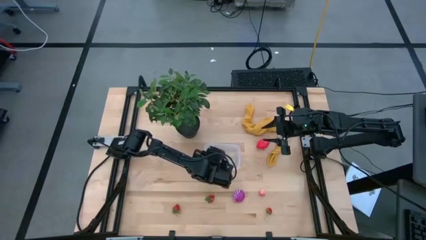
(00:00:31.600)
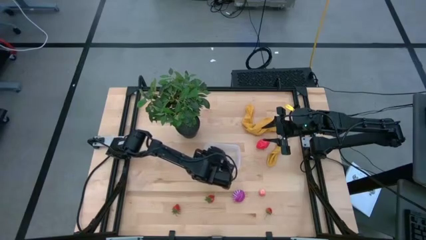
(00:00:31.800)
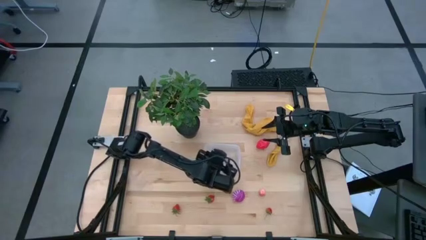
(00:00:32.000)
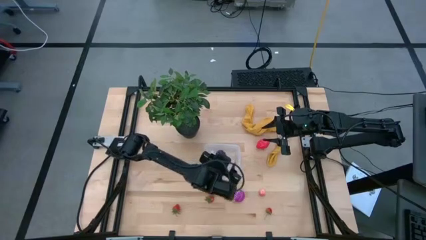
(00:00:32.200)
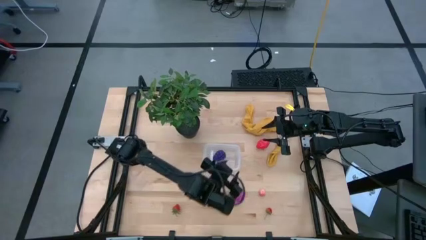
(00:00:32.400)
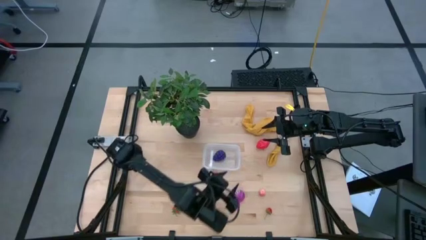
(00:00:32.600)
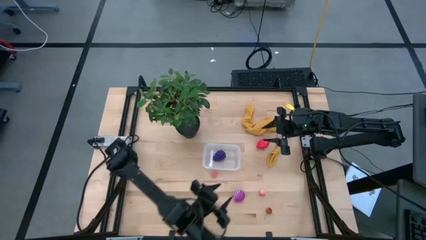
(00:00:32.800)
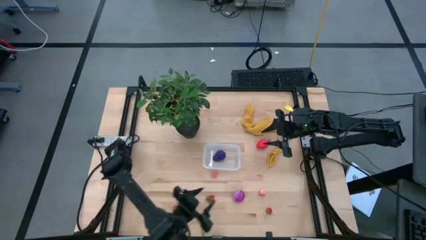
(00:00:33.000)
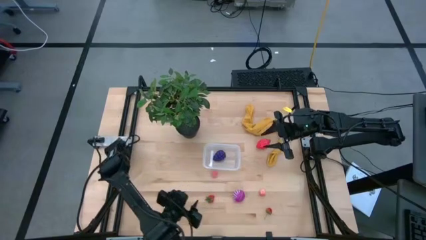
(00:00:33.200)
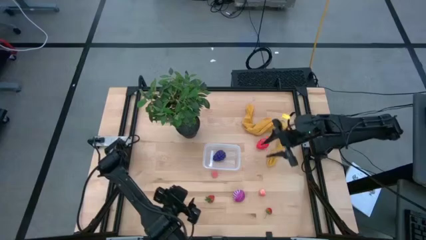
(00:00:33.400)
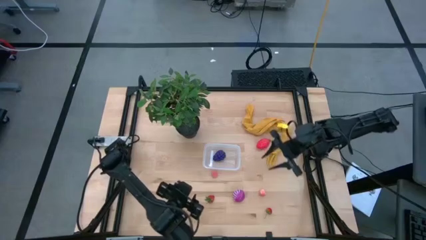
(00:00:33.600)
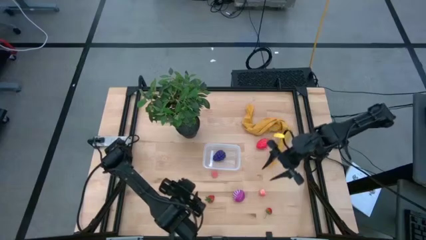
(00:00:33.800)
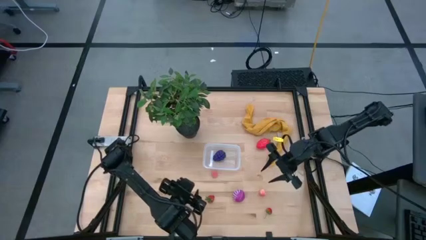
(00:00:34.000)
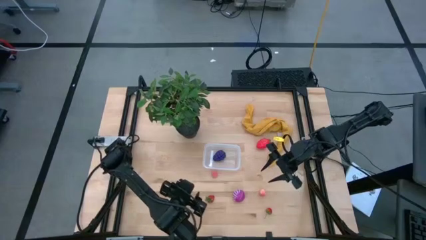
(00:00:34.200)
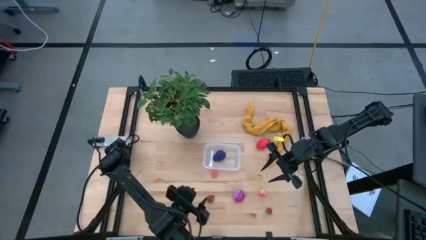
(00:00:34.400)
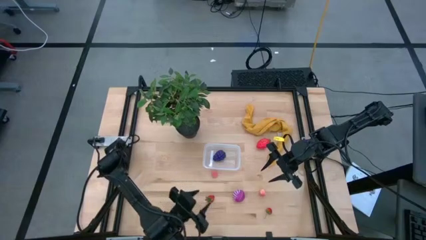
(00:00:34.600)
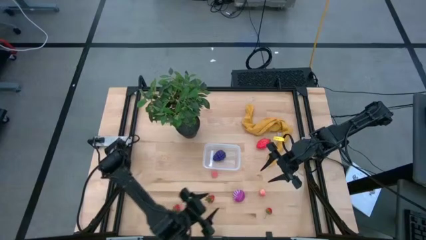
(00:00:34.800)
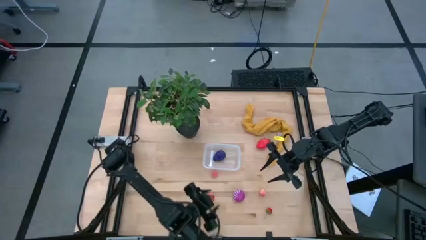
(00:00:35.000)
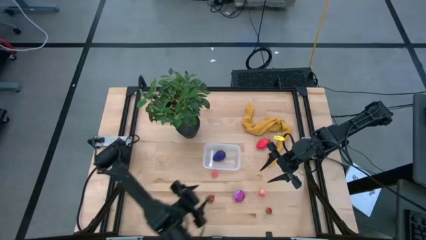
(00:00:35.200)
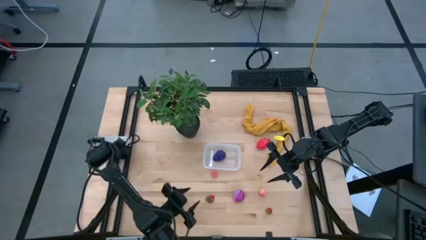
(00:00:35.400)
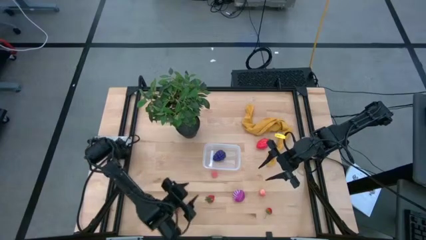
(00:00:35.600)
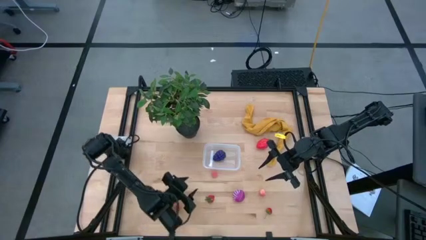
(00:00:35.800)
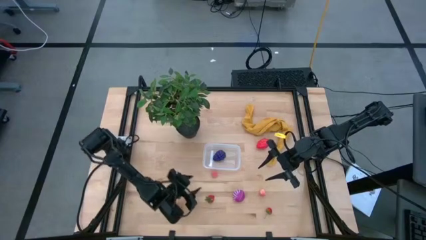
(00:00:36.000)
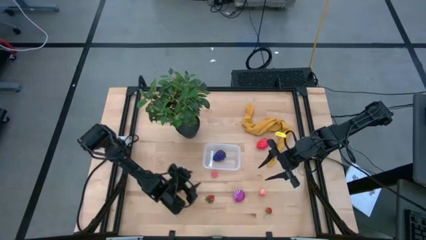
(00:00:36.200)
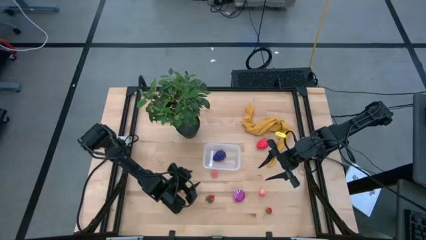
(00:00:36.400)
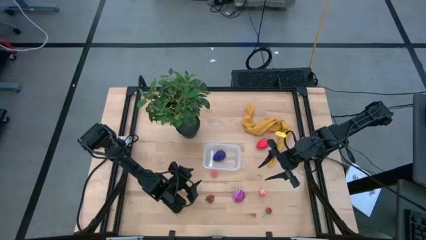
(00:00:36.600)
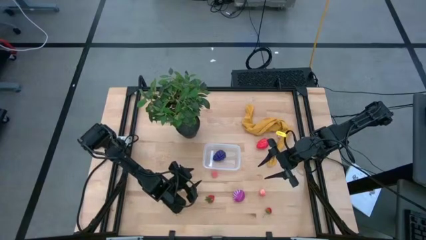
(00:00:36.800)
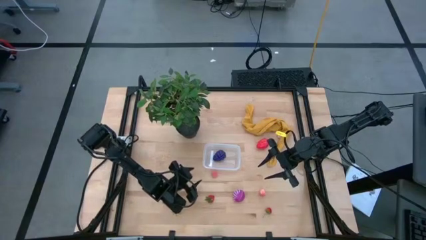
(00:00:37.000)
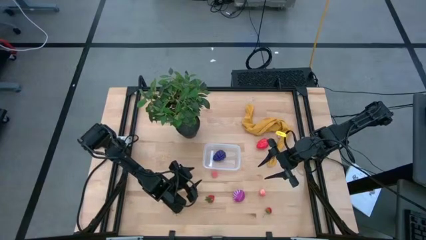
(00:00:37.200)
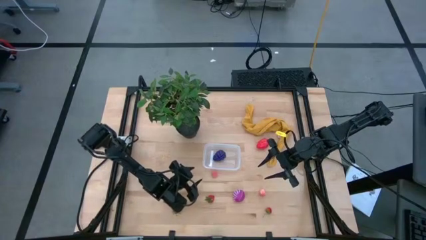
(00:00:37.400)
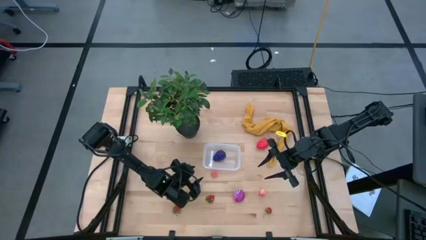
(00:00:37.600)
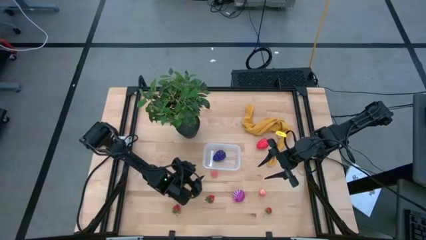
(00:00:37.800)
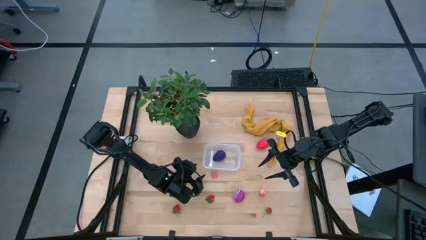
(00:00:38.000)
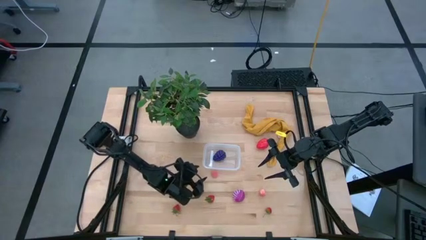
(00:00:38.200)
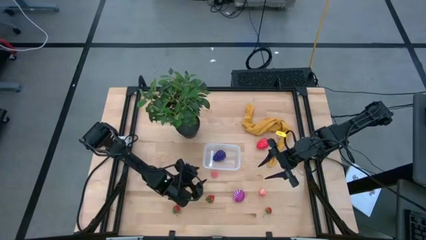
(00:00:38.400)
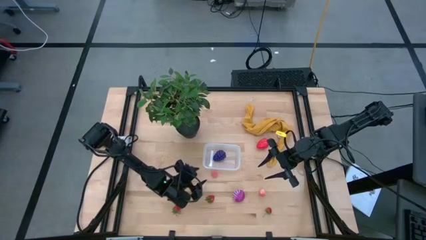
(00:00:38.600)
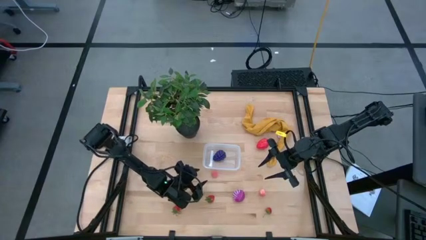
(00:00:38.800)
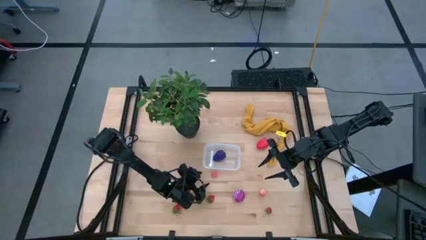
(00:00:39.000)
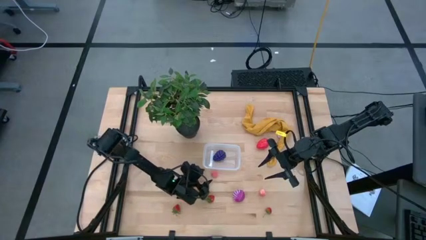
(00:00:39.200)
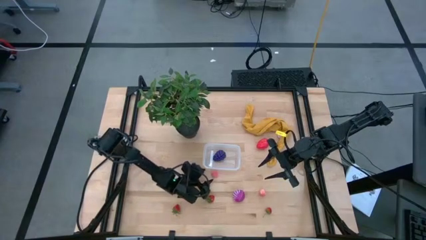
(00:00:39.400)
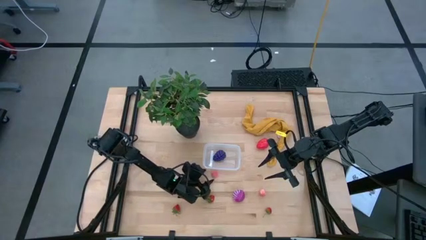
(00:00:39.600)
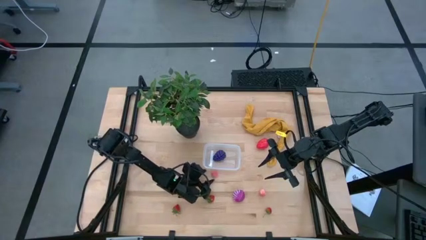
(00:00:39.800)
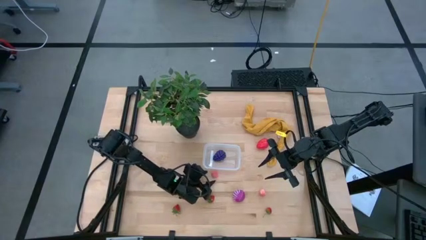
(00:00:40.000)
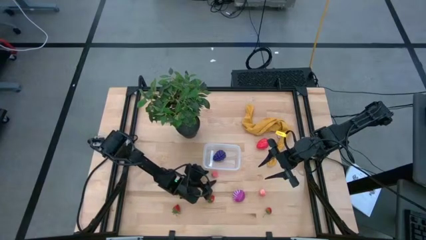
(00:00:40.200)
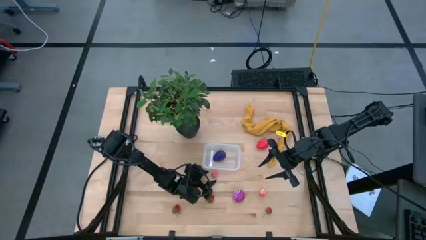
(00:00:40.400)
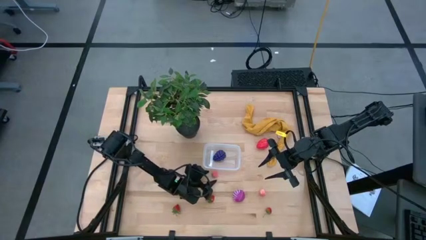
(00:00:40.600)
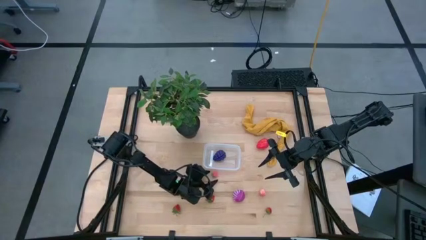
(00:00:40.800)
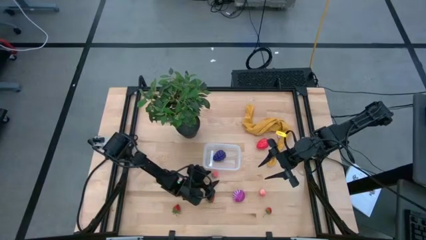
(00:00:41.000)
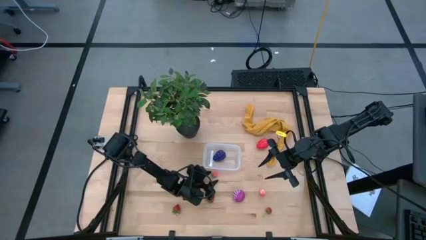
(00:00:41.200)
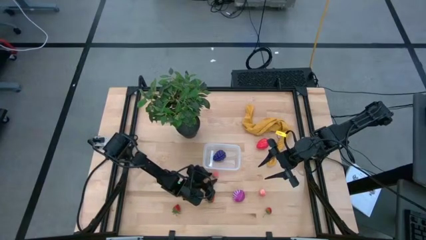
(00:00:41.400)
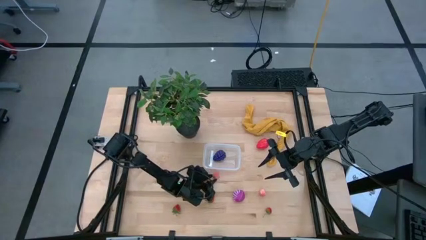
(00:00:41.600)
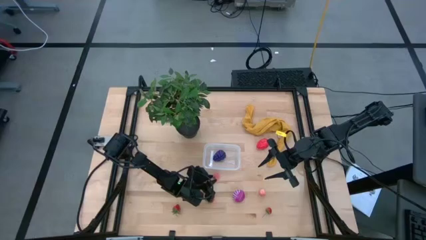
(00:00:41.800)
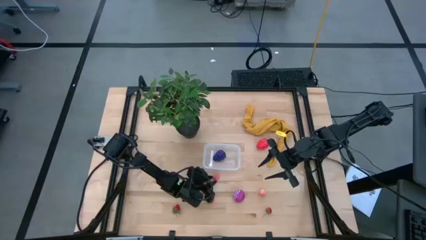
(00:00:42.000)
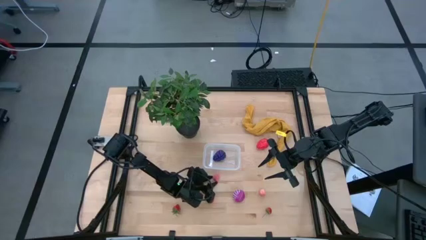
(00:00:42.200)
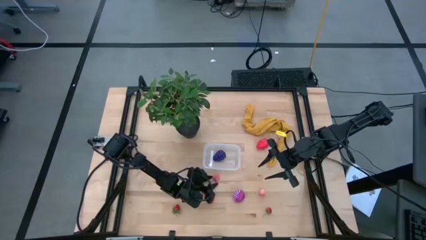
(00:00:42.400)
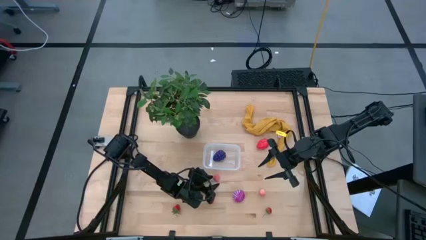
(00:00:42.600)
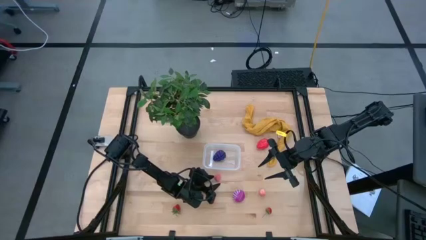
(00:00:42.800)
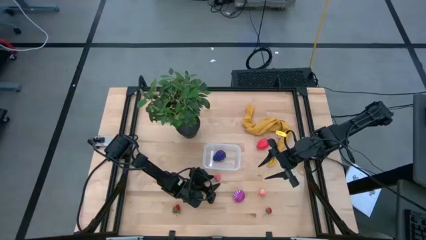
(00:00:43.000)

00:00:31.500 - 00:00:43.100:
Task: Pick and placing Produce into tupperware
Put the top peach into the bin

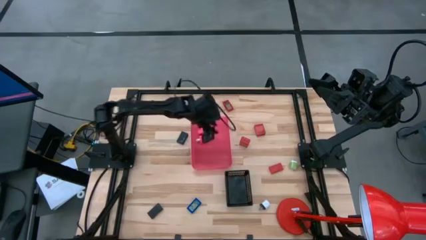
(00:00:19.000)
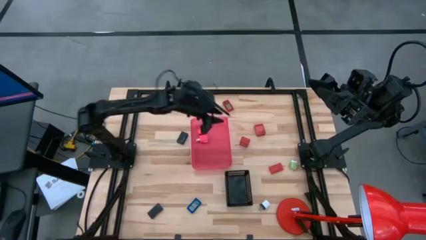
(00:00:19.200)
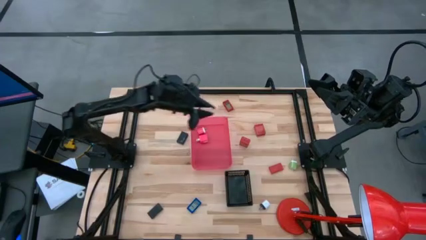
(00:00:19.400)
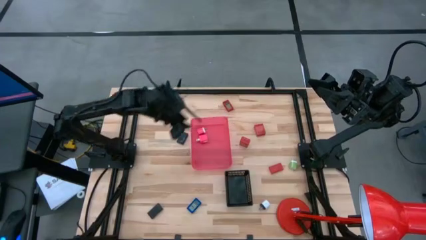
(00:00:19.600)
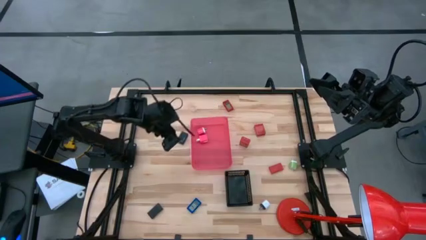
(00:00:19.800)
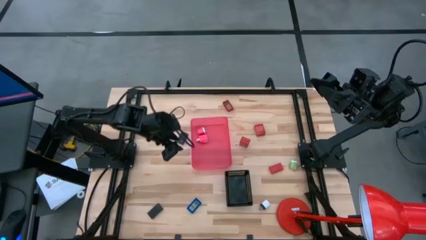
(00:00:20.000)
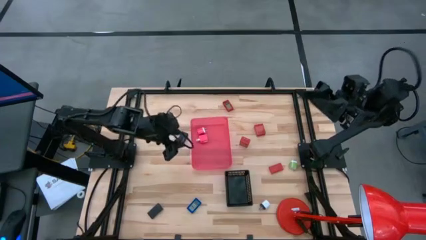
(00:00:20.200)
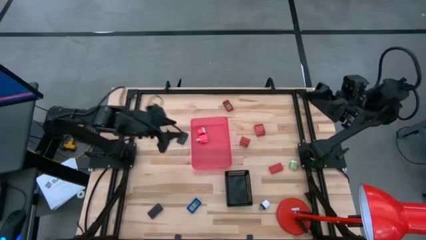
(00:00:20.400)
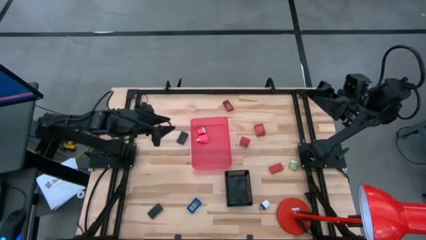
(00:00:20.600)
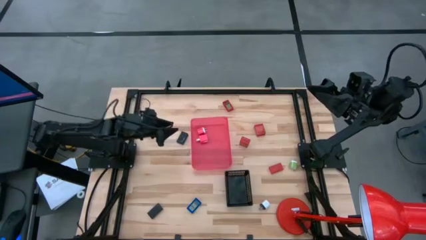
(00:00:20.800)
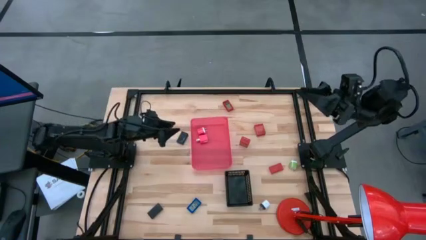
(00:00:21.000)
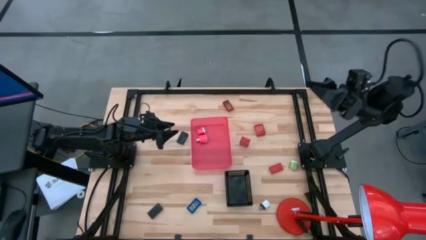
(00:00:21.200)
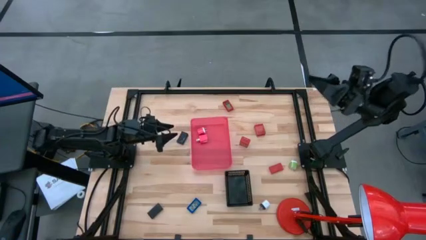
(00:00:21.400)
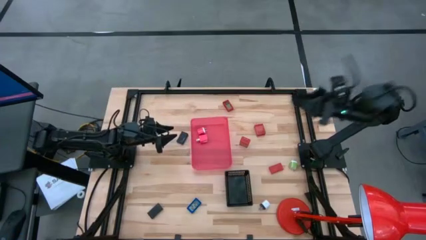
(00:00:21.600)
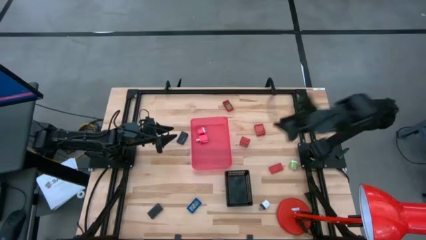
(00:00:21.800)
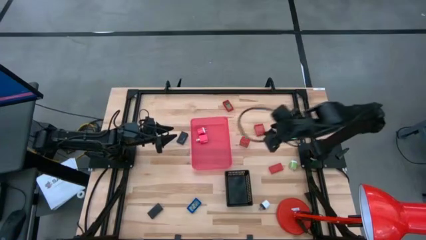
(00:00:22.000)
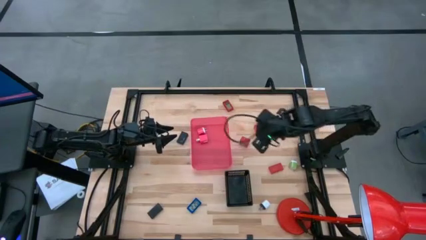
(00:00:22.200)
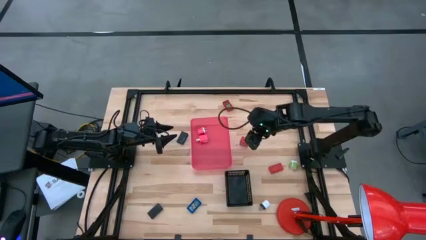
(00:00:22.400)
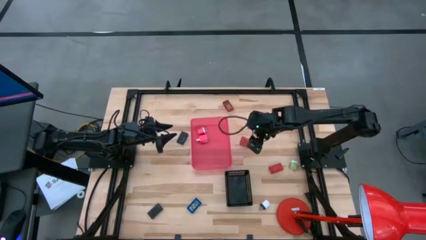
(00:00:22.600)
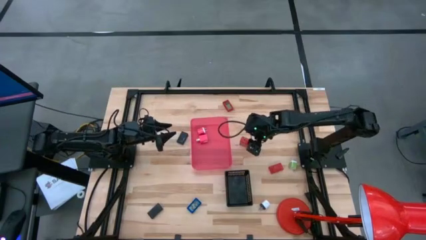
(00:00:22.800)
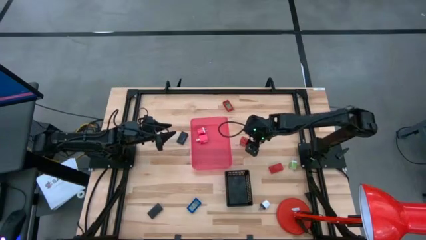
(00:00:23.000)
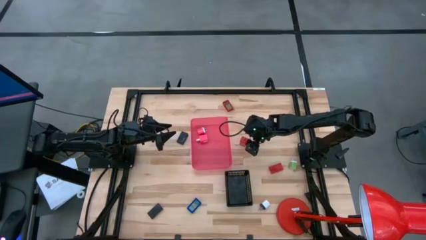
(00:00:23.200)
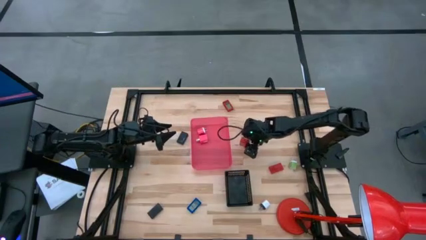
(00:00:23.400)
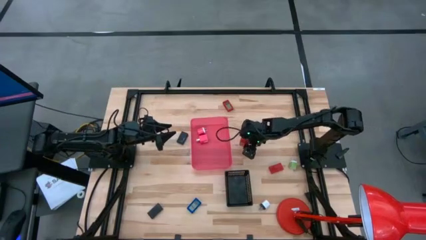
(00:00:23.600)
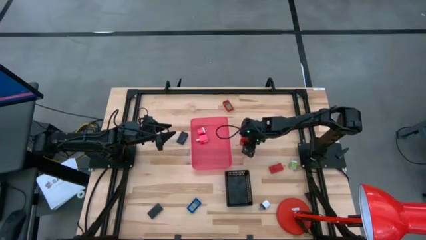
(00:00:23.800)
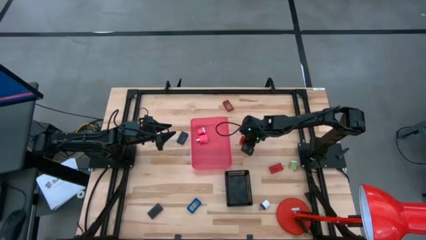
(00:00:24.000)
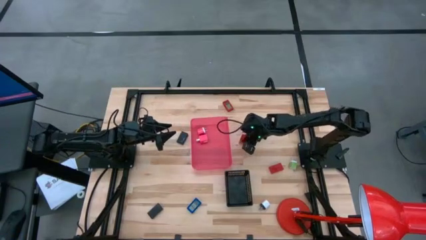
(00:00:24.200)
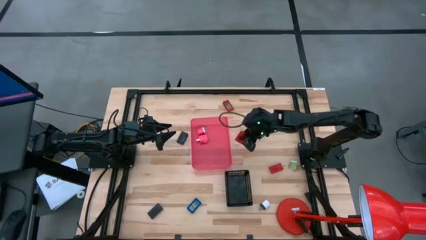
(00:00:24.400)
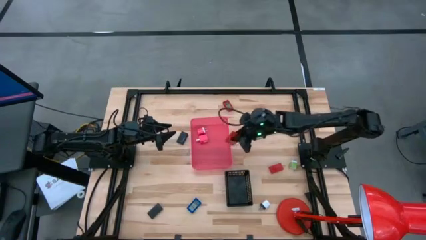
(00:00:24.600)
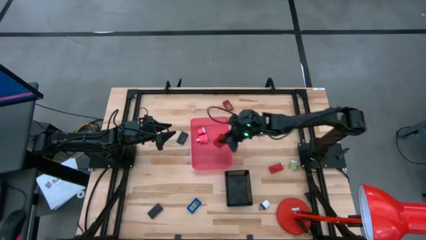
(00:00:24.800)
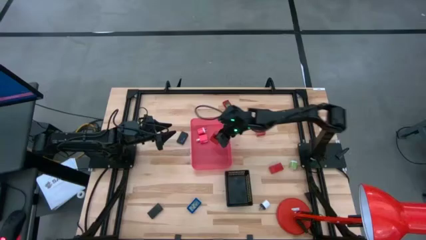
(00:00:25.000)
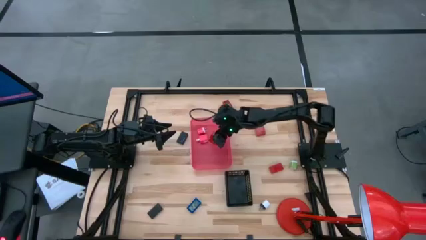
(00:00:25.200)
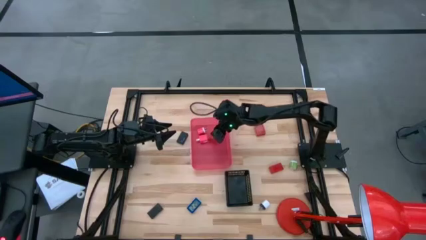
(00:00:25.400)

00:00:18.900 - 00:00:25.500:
Task: Pick & Place Office items
Put the left red charger adapter into the pink bin
